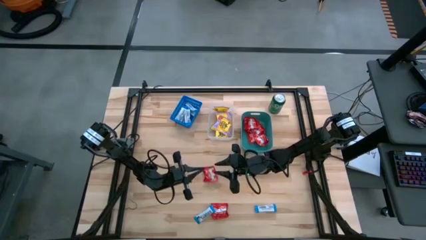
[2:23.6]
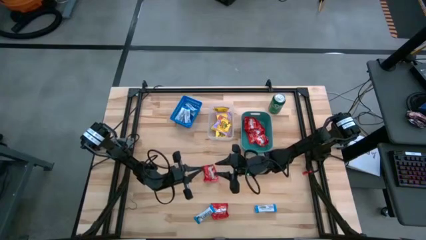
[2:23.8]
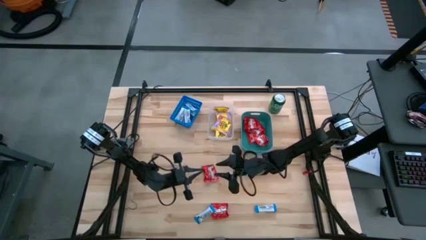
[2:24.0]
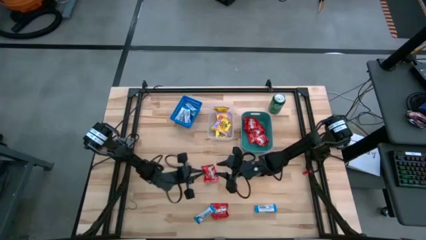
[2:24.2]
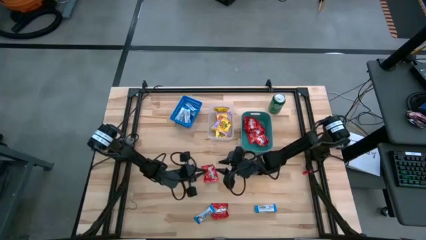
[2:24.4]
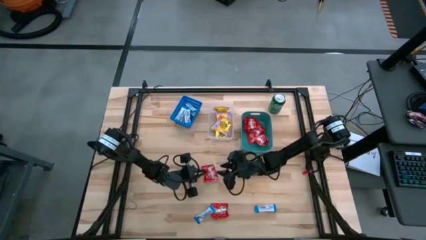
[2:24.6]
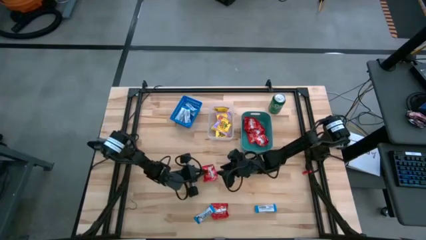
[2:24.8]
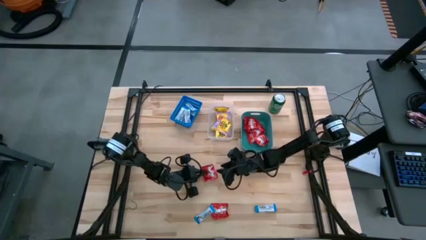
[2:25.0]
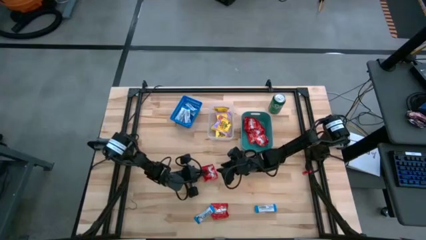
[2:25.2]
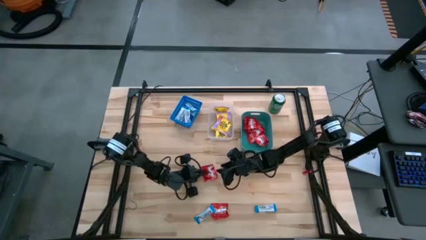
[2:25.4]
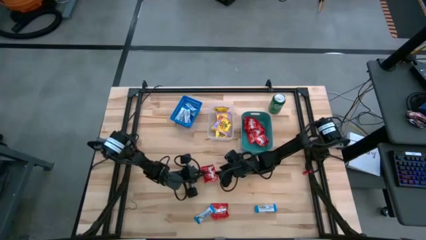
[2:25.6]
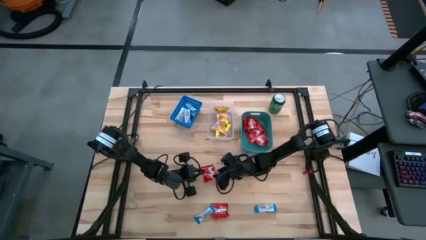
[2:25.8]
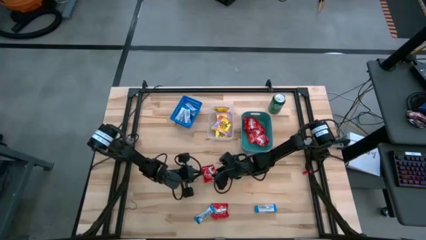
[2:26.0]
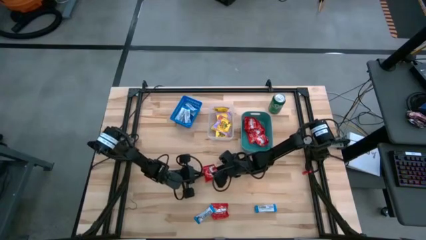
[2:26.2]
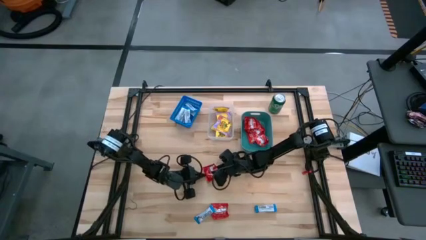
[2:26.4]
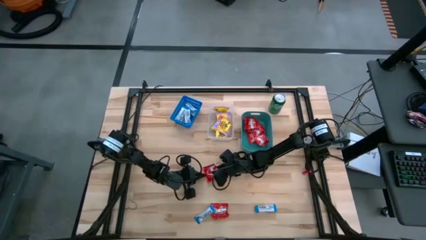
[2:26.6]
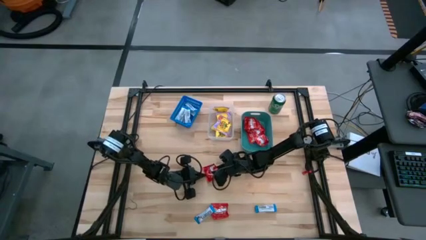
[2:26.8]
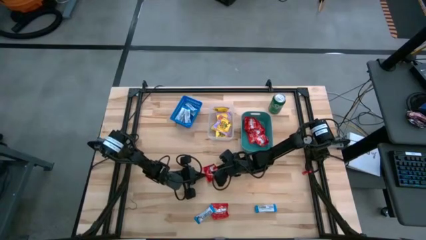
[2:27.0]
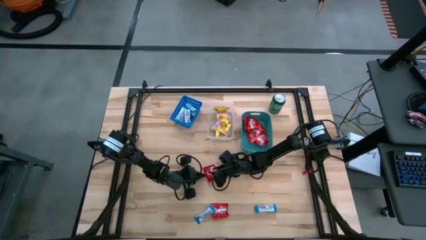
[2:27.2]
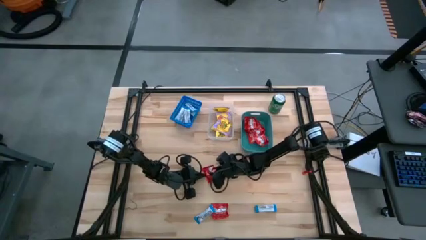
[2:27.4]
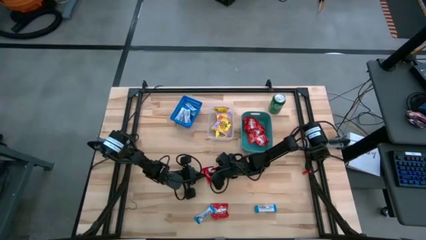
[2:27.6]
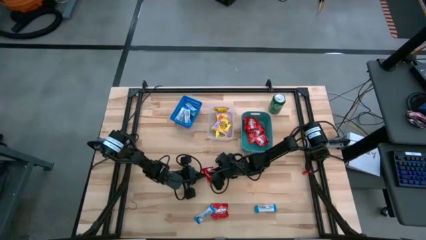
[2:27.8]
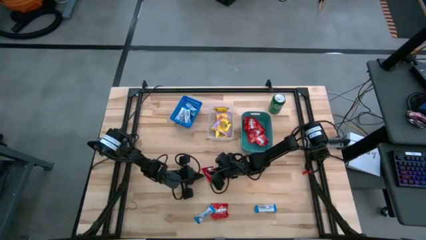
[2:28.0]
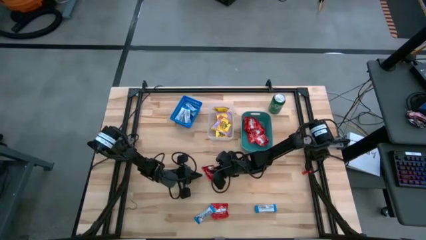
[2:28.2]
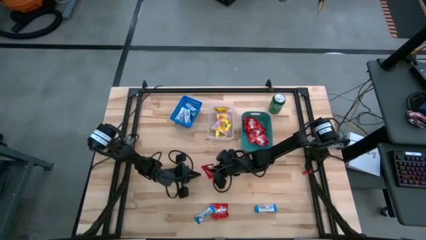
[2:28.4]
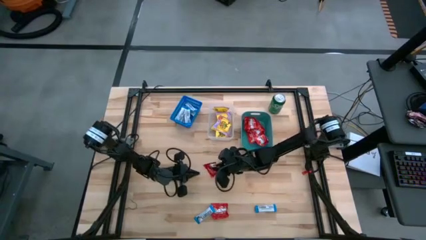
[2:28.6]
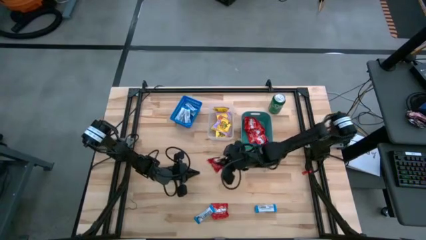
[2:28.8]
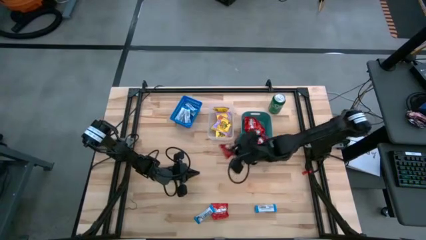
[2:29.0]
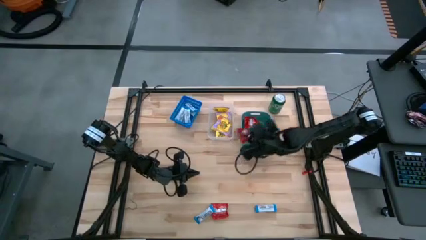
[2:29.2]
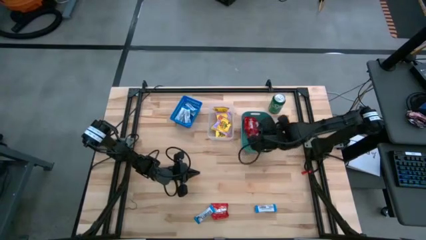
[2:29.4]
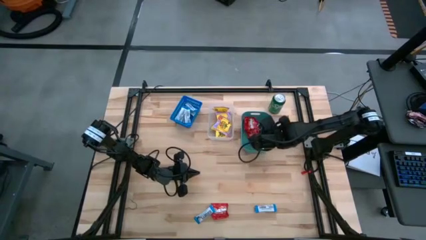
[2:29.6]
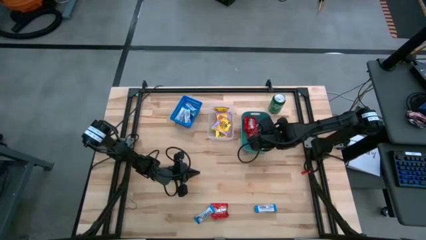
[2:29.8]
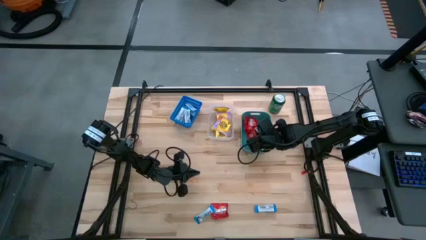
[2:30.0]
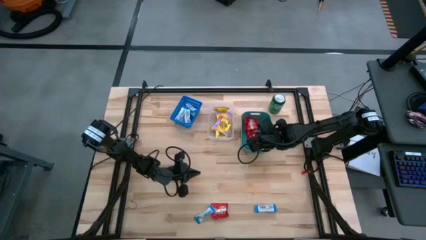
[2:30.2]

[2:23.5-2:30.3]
Task: Sort candy
Put the red candy into the green bin

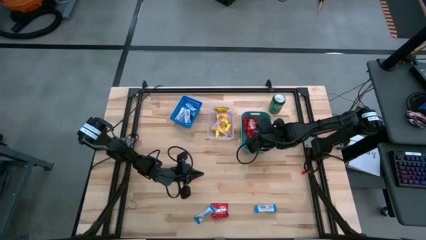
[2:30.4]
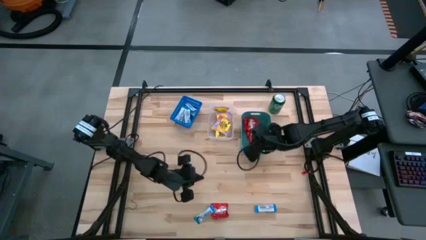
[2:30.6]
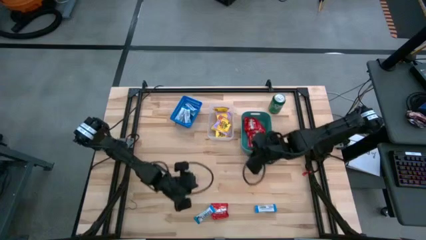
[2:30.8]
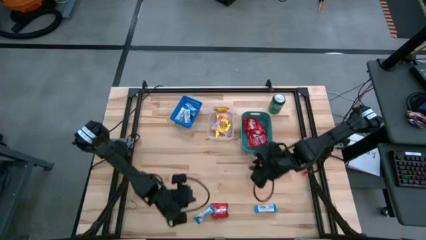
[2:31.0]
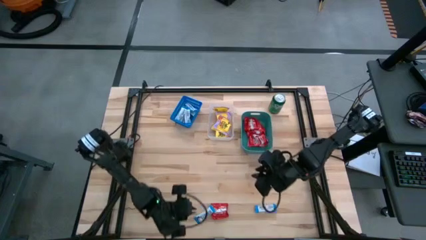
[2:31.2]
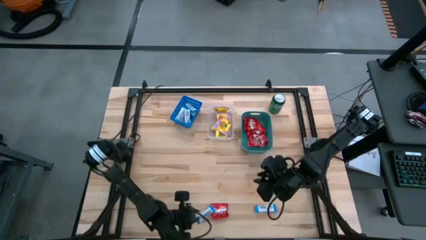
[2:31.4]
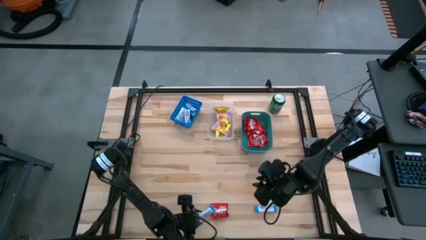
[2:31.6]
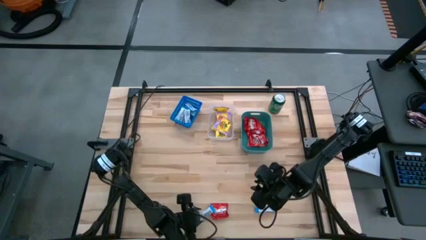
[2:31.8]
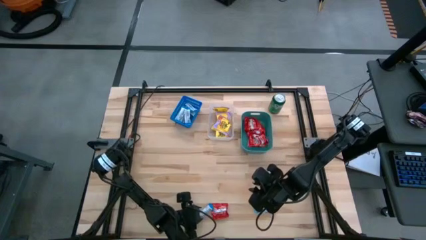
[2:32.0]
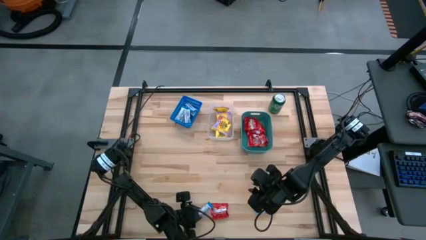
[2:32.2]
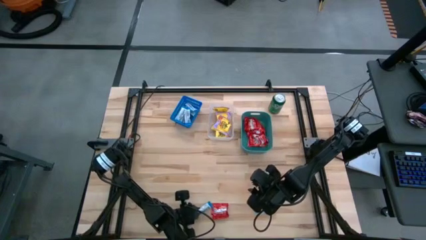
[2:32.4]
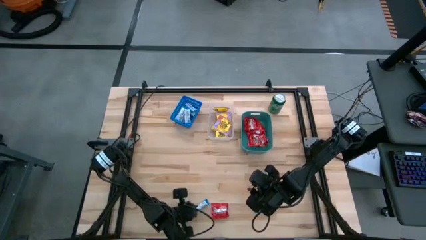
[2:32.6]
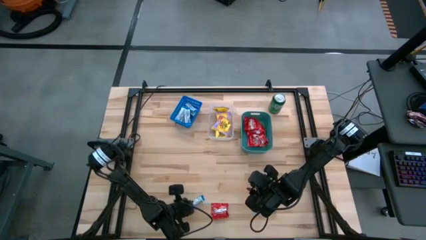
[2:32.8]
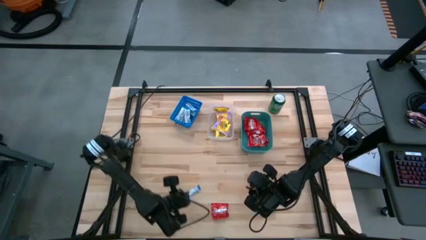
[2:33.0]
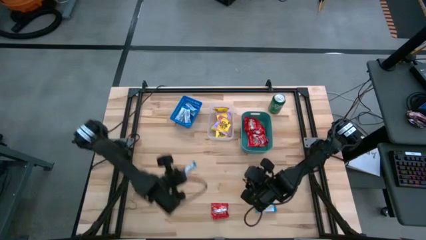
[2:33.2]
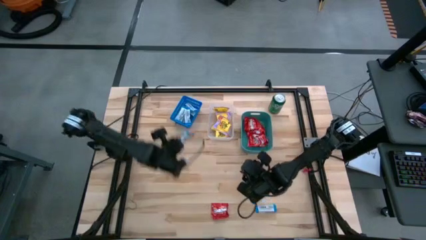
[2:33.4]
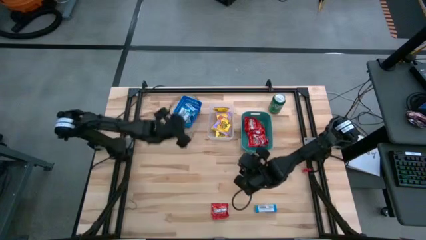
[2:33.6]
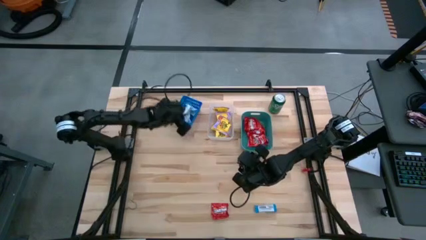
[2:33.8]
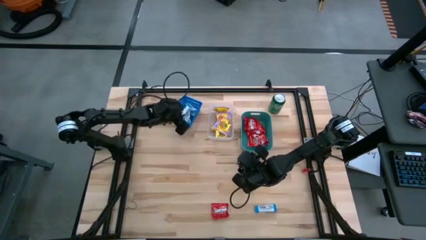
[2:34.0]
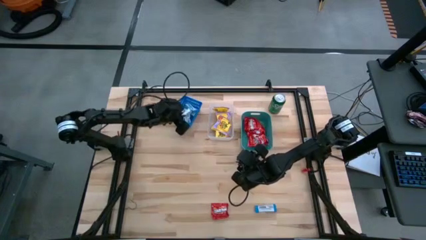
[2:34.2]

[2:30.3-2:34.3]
Put the white chocolate bar into the blue bin

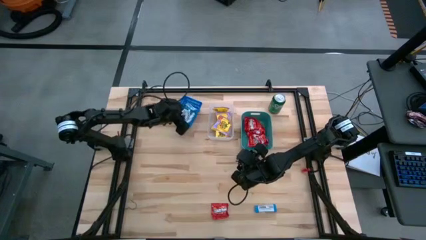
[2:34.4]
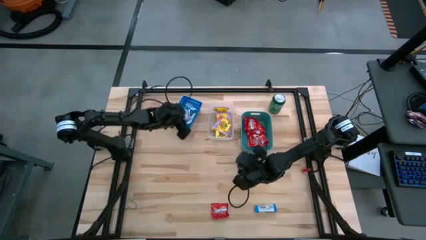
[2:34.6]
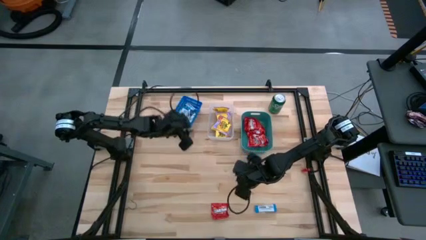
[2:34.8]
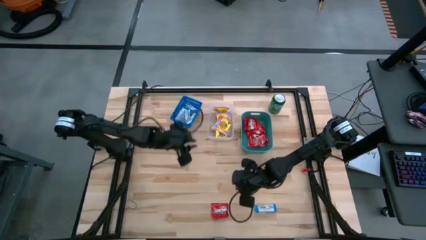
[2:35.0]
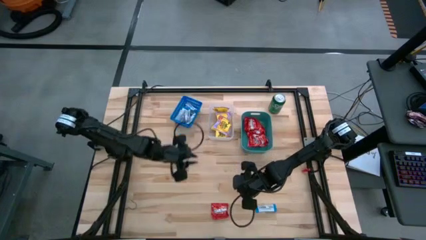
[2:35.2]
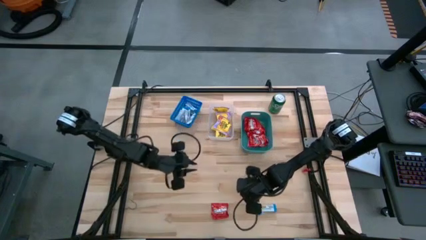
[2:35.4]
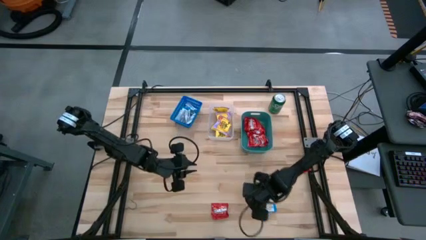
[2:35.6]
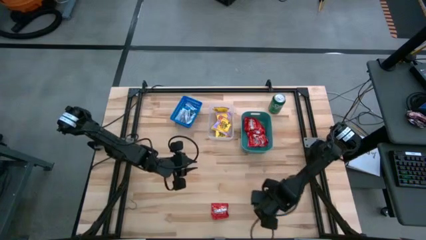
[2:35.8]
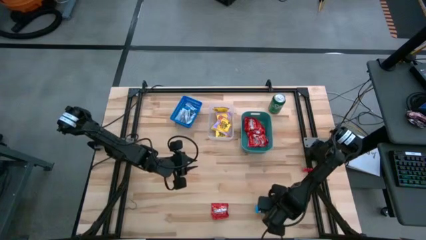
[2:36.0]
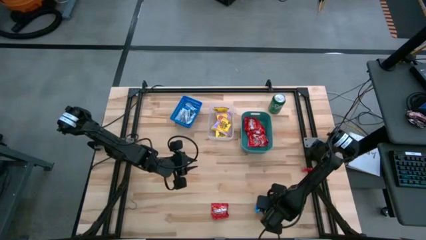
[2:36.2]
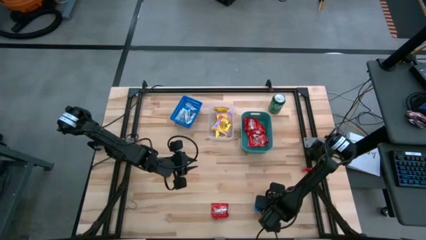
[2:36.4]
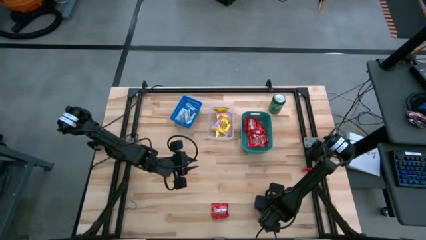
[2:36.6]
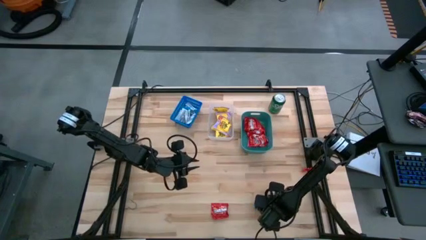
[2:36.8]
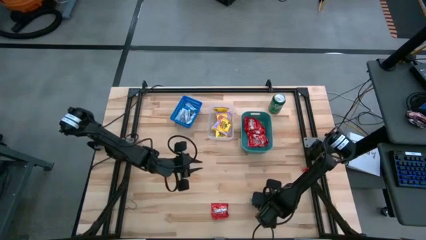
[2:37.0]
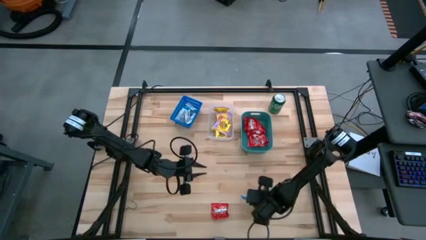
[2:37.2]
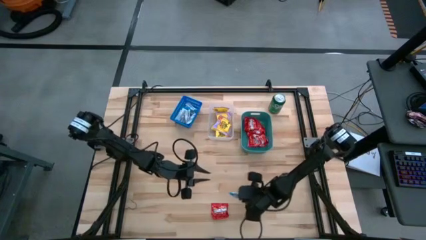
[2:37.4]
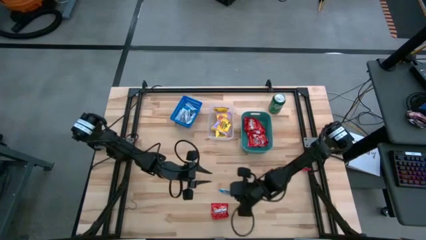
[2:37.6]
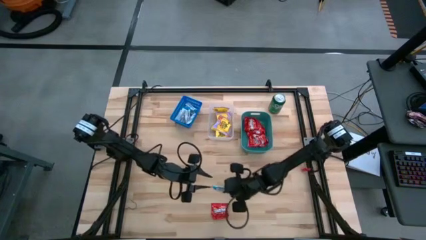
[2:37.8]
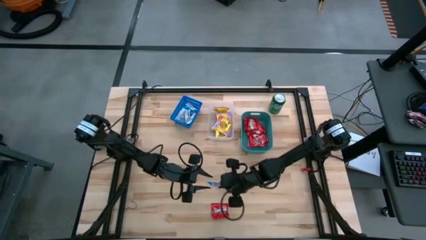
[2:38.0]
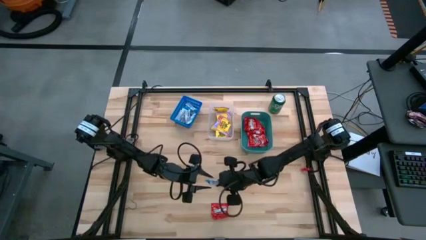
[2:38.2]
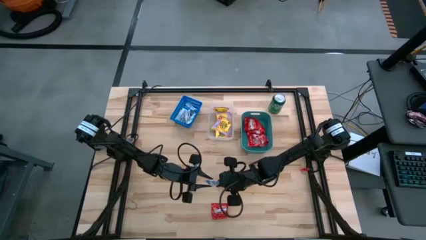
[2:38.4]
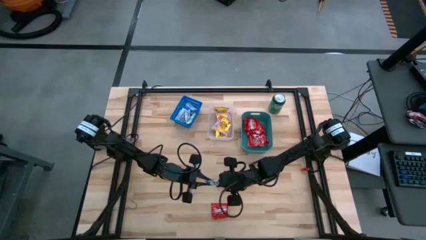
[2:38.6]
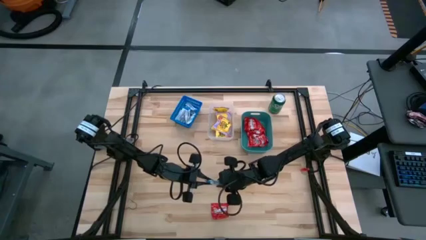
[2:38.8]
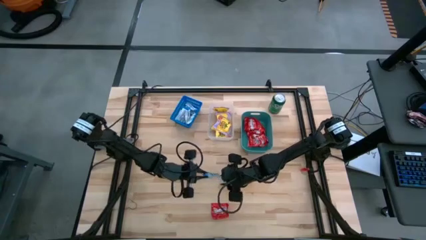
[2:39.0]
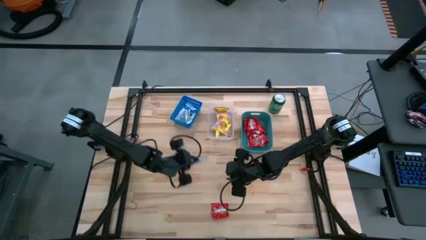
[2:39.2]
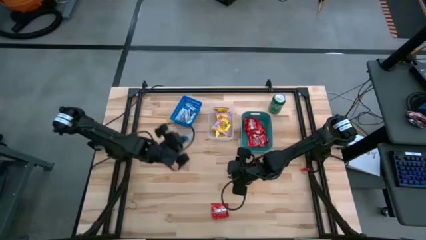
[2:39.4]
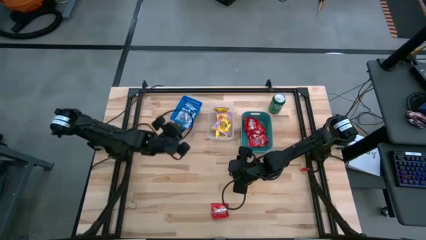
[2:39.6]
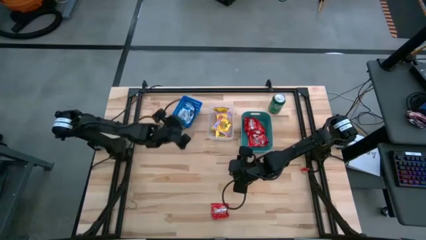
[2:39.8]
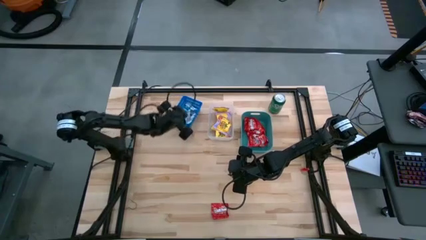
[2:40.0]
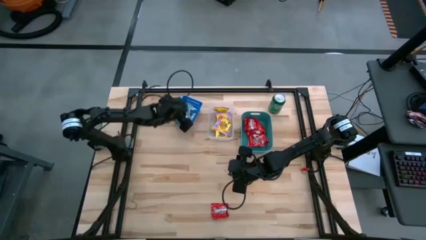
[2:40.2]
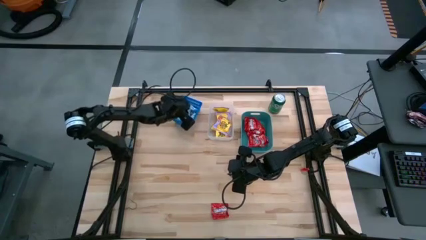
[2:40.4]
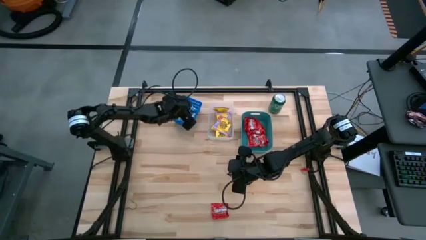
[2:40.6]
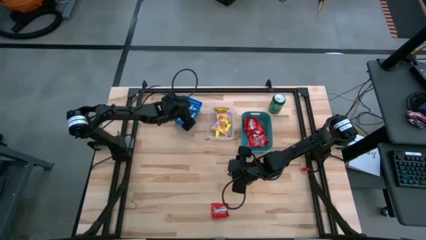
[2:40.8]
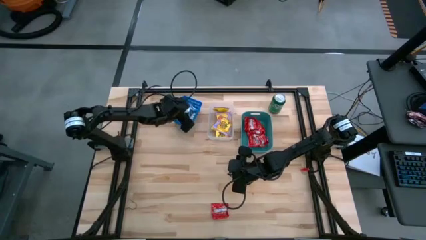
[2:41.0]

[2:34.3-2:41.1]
Put the white chocolate bar into the blue bin
